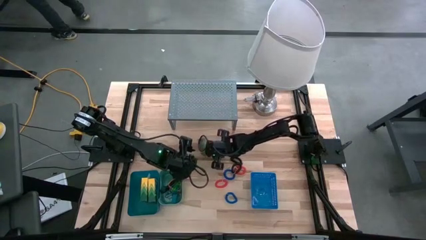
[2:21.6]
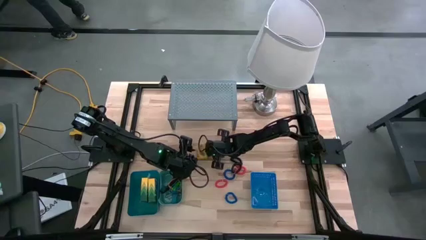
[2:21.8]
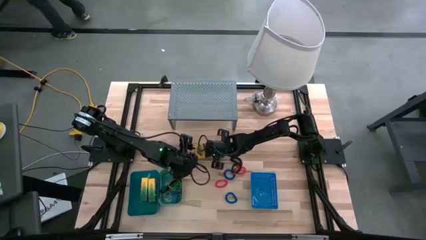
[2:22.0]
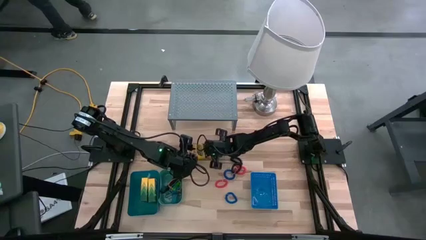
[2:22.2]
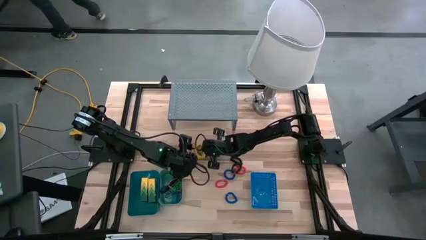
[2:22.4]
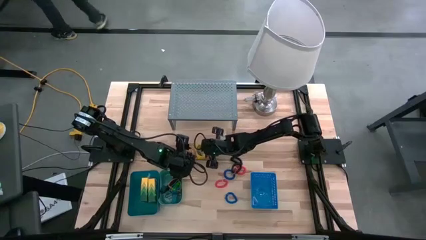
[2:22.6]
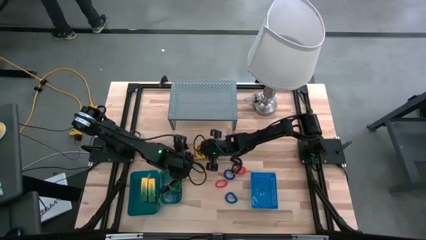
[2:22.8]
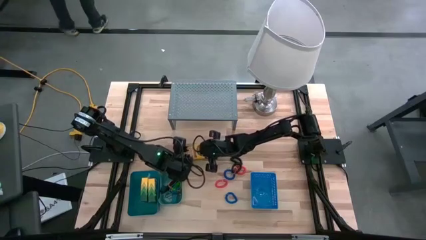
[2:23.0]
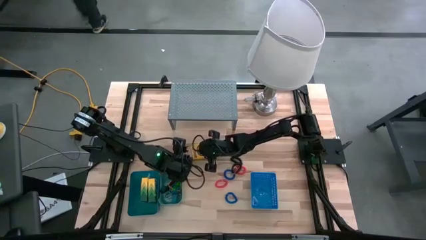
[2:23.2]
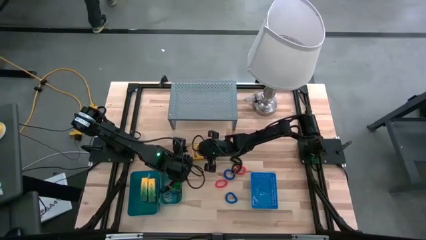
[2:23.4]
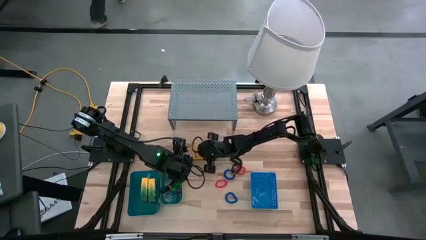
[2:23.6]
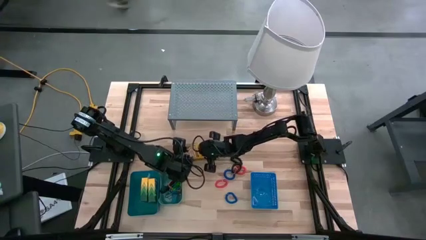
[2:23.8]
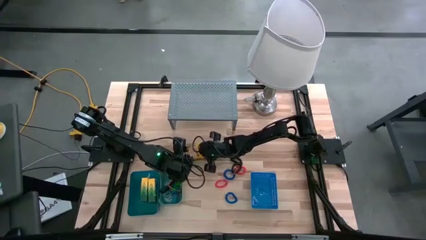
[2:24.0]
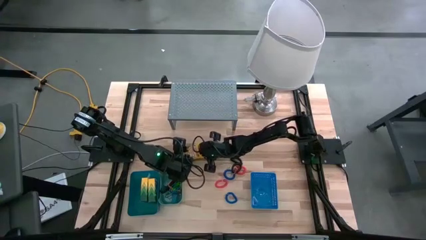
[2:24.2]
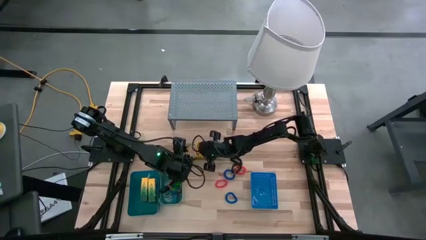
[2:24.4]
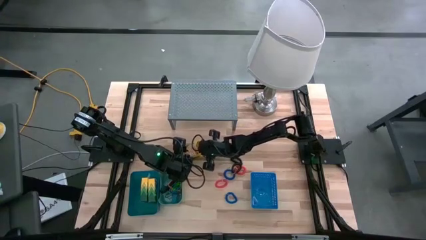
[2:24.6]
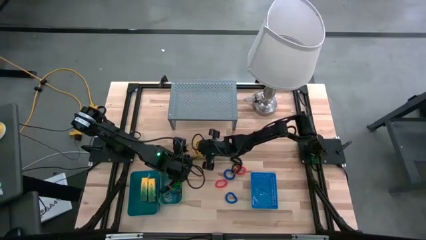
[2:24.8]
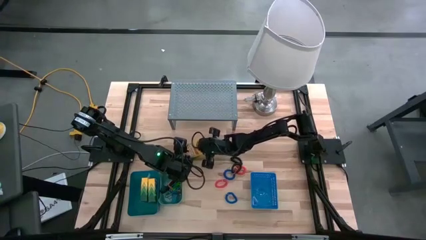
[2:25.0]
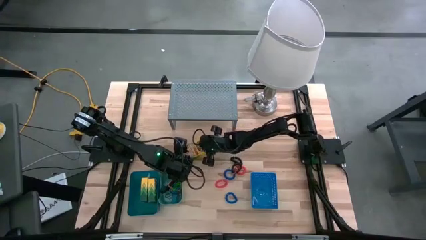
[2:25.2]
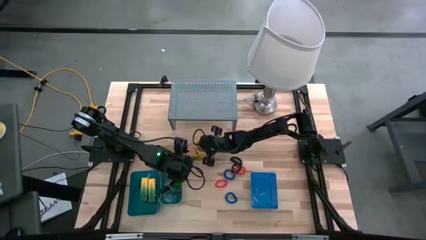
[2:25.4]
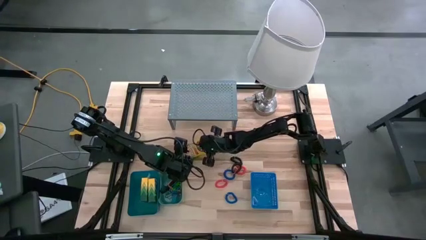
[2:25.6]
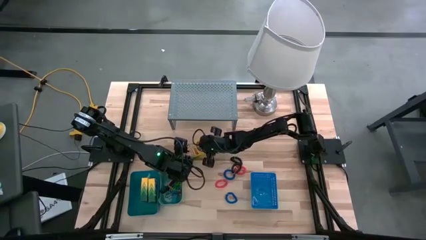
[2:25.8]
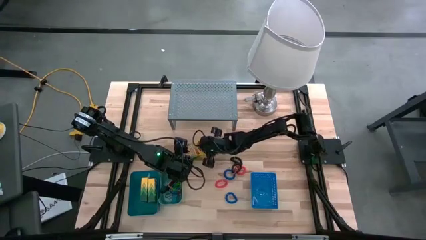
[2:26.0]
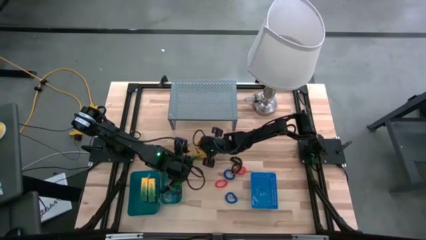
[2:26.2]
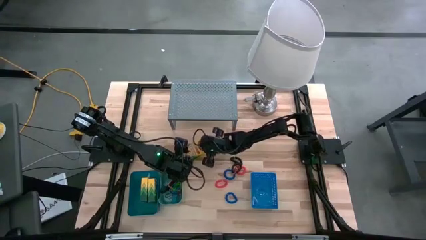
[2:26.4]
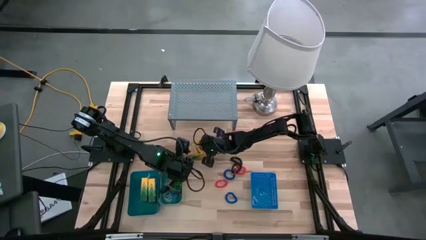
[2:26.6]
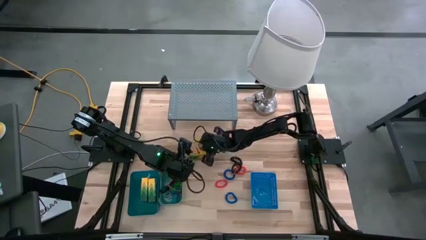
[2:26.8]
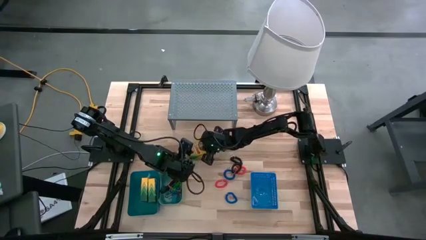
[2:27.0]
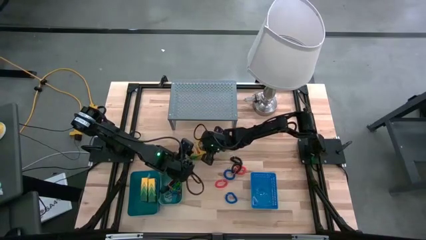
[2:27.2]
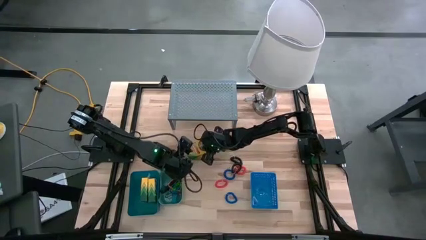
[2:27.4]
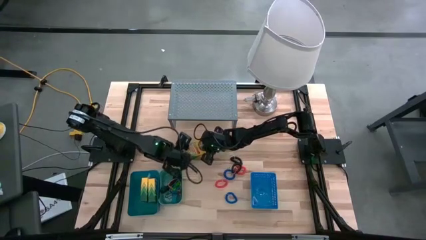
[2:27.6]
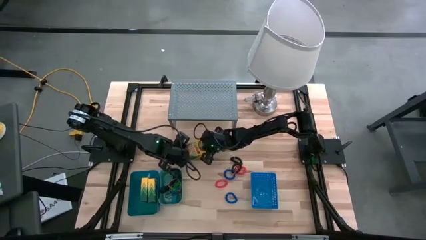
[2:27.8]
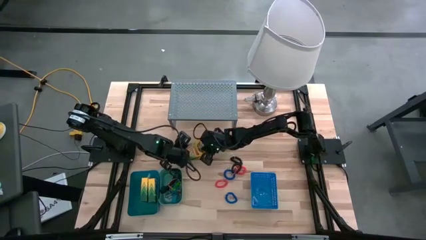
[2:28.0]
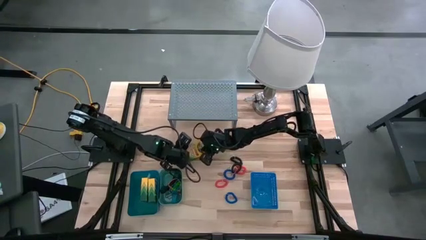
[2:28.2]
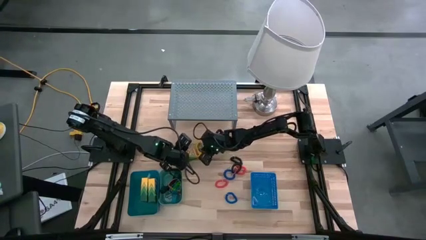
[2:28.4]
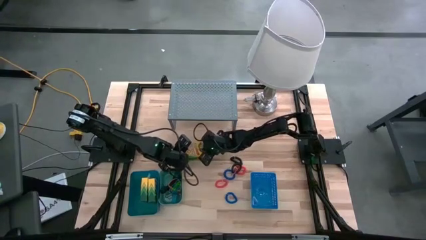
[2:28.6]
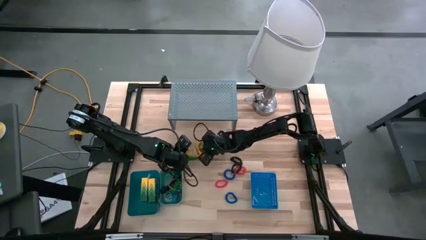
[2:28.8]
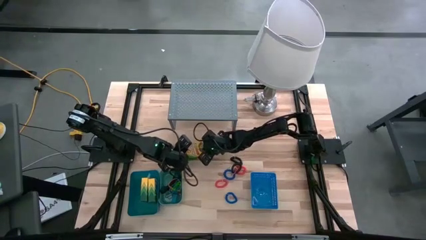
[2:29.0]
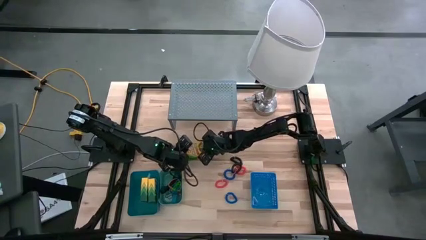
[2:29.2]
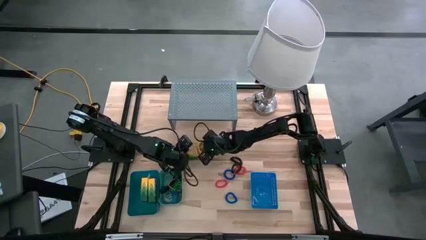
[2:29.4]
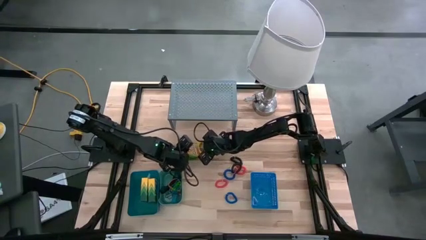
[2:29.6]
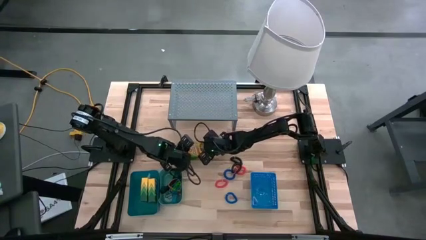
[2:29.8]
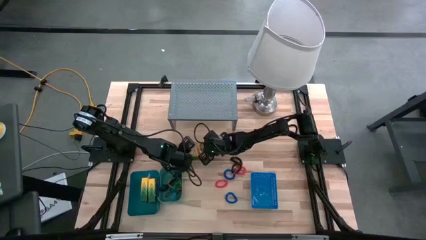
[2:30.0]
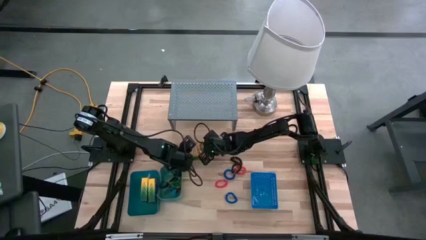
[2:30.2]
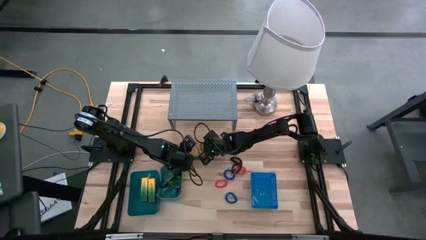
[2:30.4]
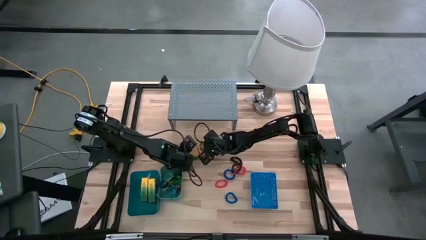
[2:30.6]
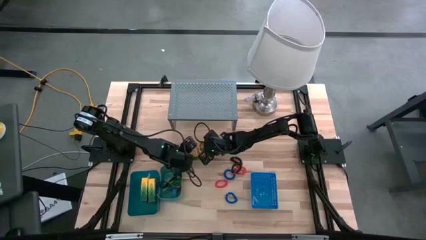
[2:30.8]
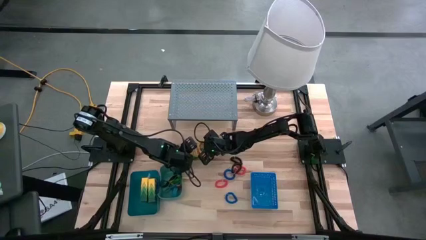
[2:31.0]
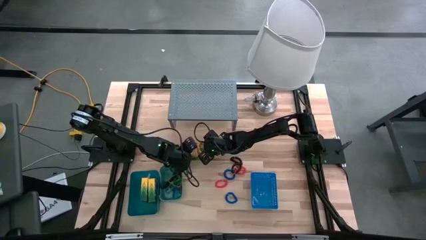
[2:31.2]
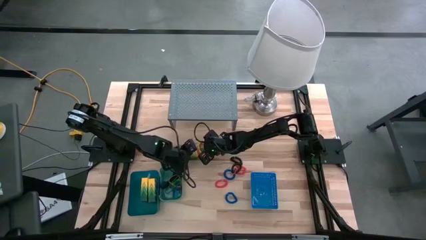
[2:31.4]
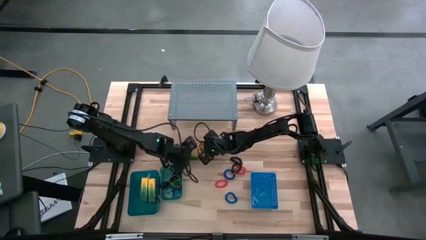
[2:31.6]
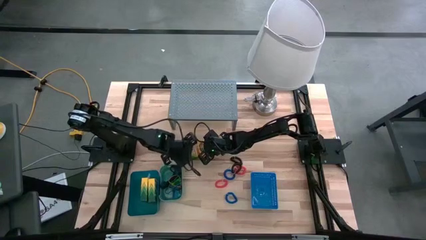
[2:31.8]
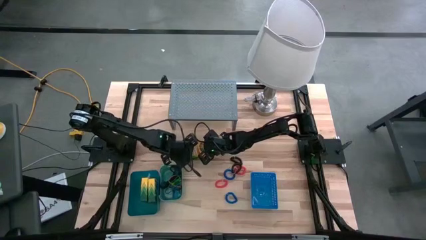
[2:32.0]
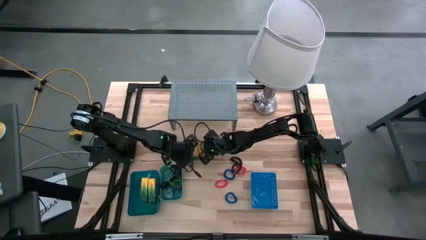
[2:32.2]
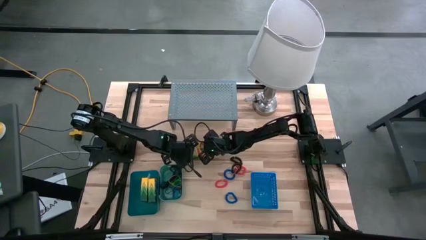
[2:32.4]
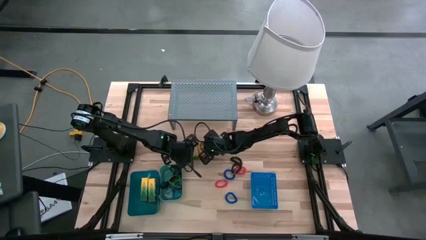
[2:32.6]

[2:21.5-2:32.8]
Task: Pick & Place Office Desk Supplies
Put the box of crayons into the light blue bin

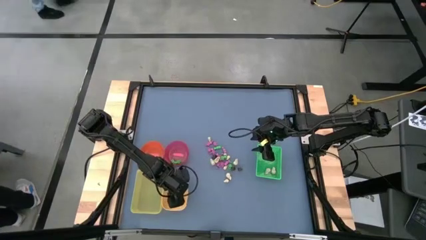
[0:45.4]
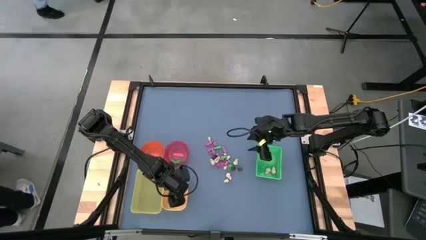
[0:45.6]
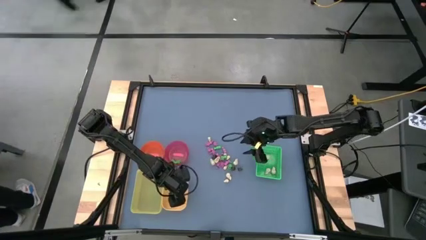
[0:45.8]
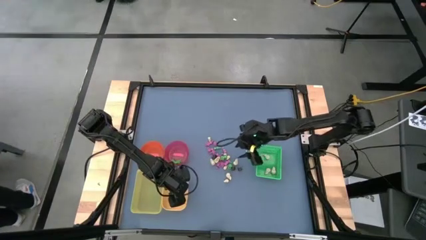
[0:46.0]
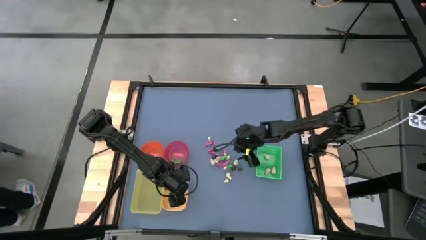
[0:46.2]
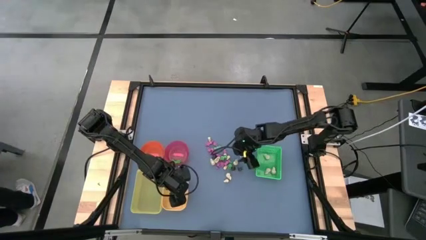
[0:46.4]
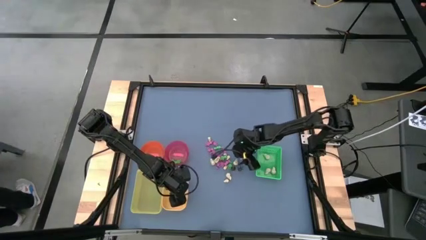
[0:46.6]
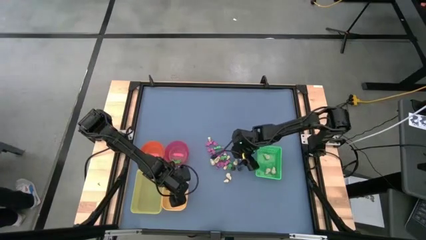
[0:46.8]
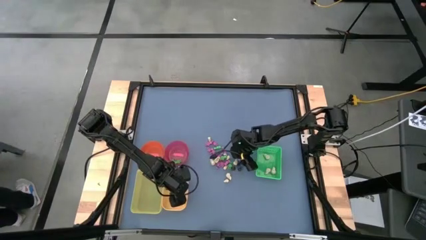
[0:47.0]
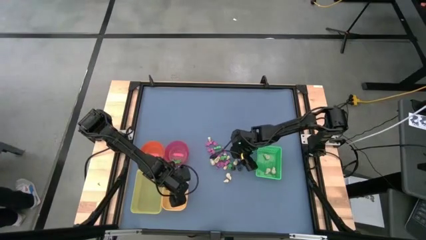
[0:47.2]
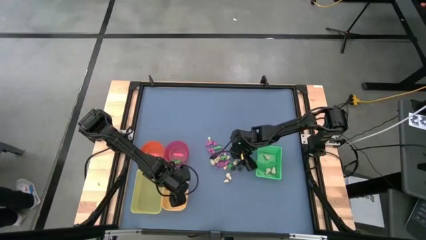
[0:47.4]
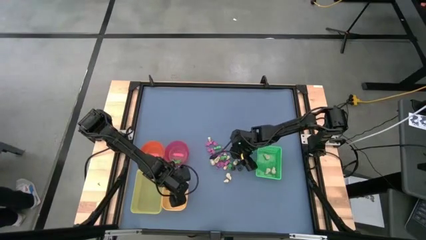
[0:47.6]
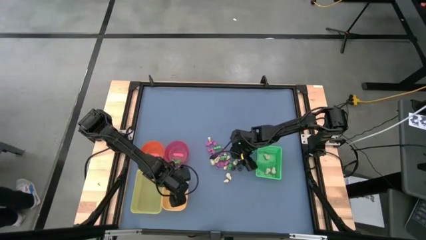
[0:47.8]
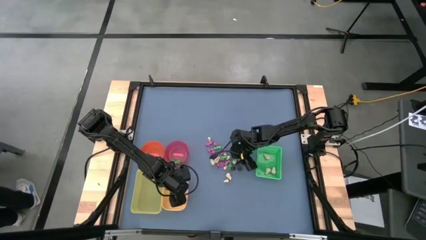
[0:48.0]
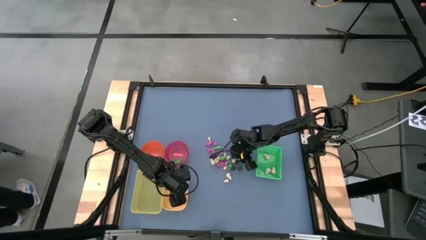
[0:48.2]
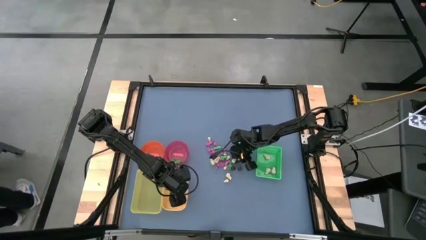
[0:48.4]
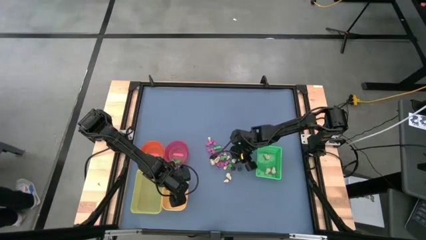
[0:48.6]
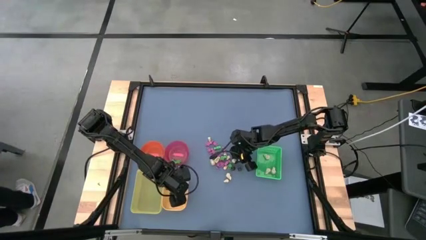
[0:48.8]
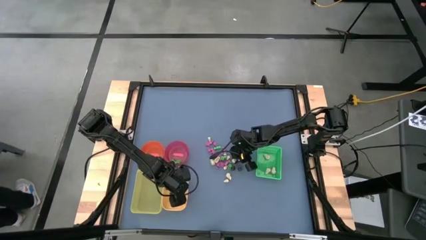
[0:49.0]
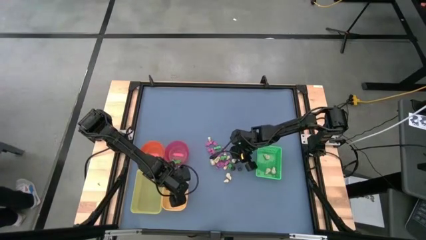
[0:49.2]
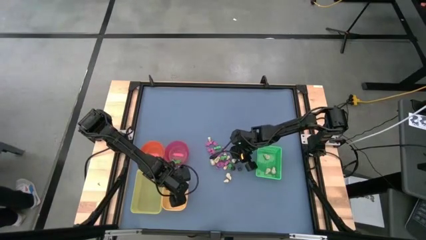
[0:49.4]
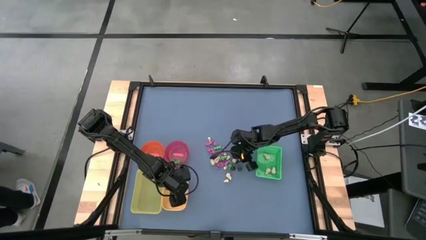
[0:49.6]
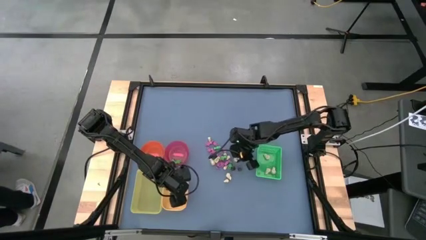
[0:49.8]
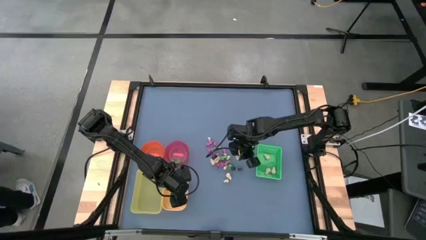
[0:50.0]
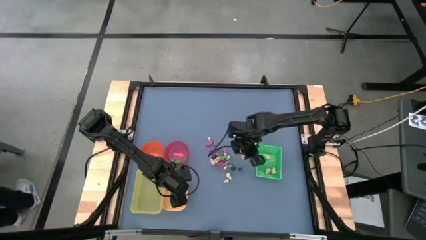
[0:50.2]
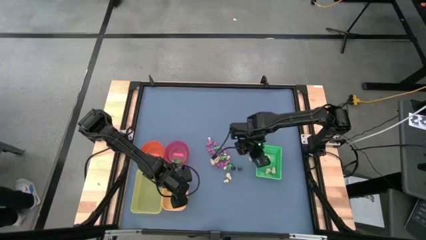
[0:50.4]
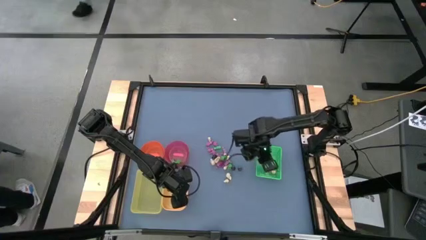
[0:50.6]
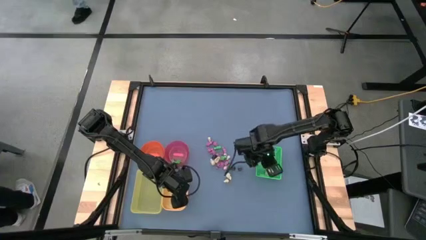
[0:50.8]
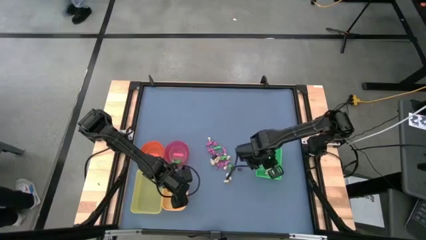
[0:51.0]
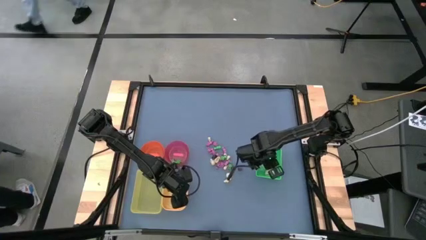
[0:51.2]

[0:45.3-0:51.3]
Task: Sort Halloween decoration
Put the white skull toy into the green bin
